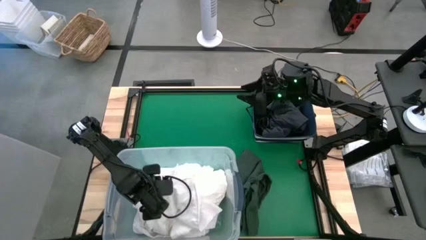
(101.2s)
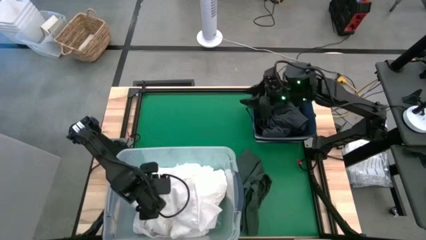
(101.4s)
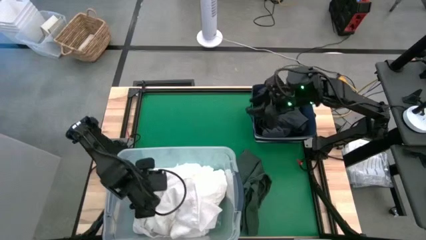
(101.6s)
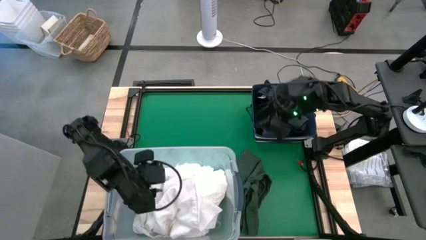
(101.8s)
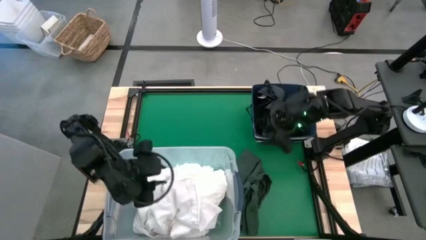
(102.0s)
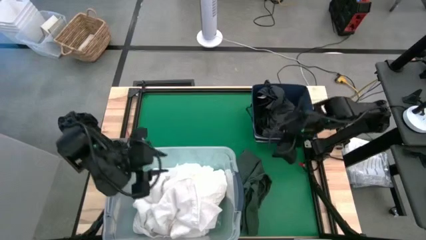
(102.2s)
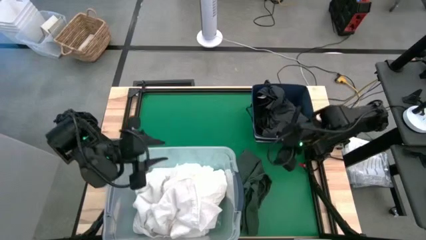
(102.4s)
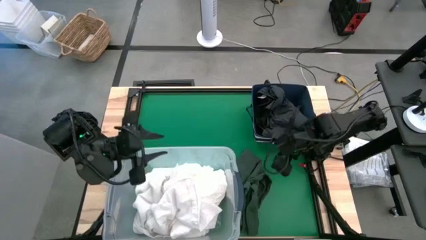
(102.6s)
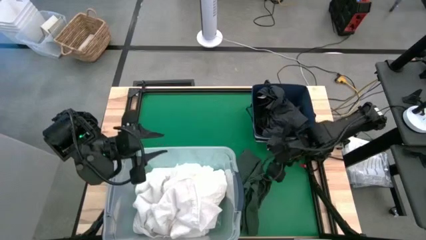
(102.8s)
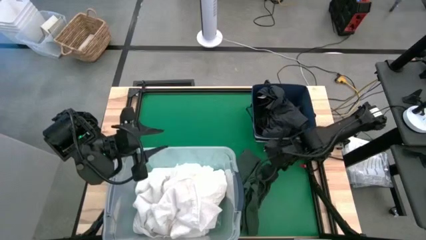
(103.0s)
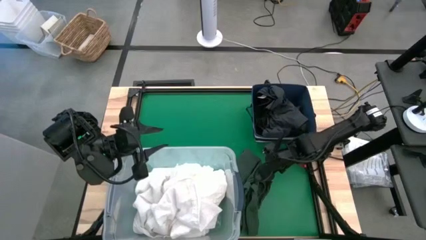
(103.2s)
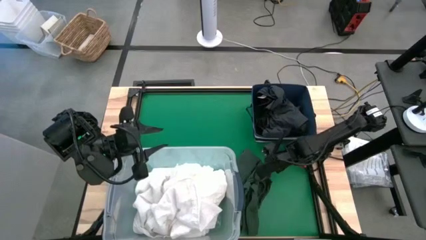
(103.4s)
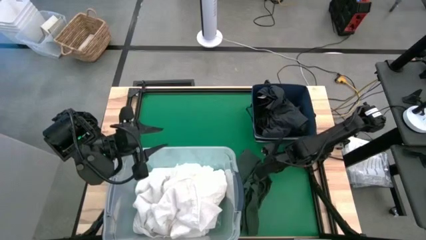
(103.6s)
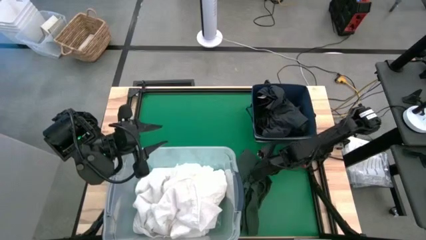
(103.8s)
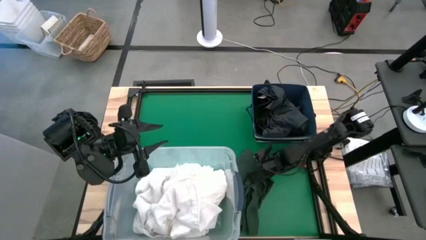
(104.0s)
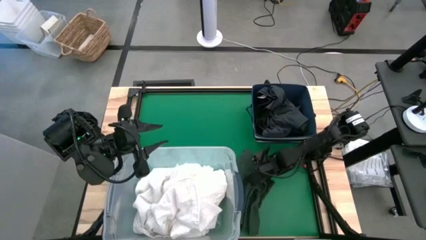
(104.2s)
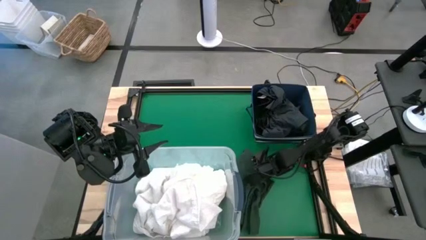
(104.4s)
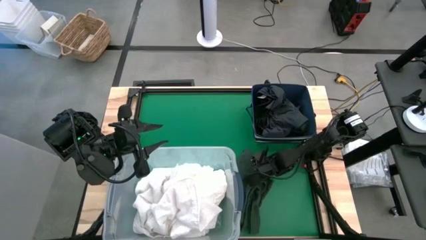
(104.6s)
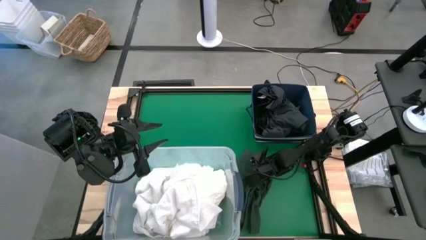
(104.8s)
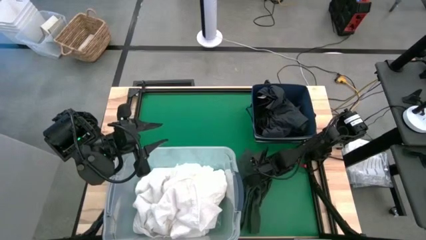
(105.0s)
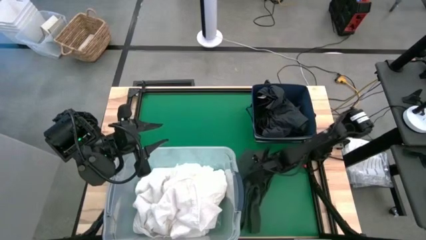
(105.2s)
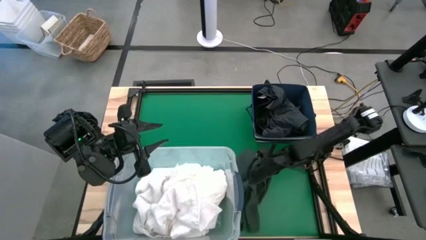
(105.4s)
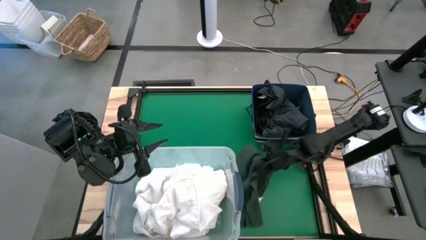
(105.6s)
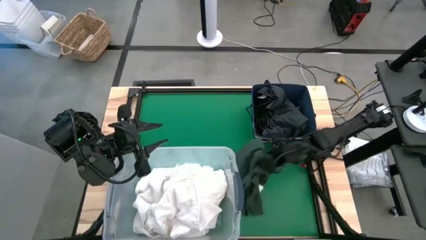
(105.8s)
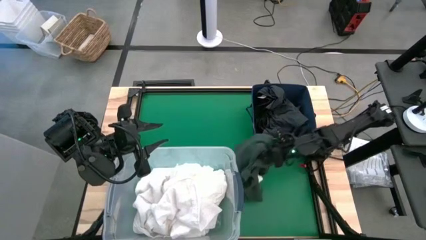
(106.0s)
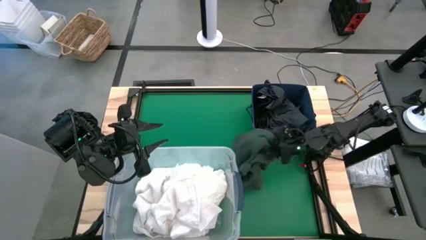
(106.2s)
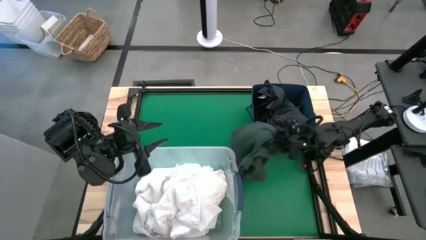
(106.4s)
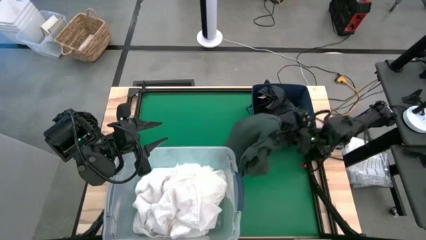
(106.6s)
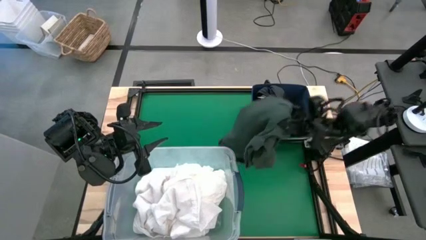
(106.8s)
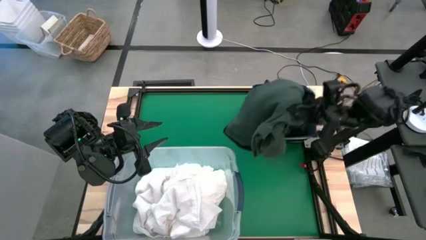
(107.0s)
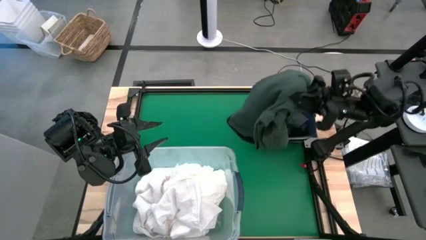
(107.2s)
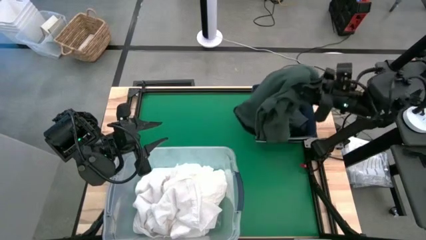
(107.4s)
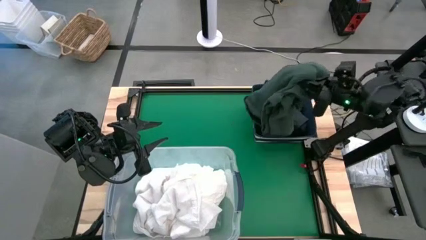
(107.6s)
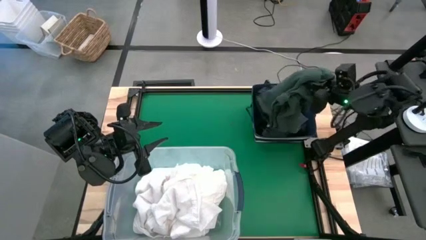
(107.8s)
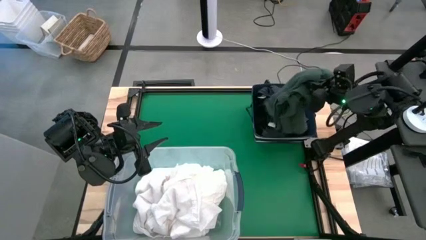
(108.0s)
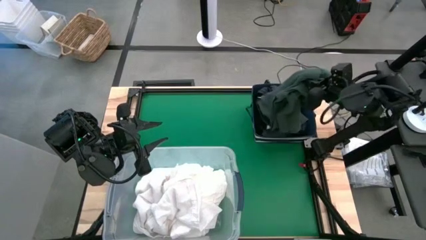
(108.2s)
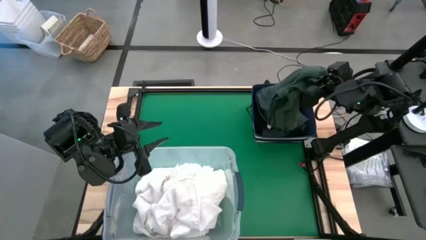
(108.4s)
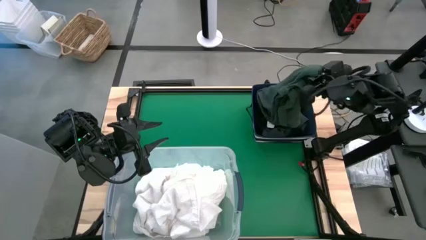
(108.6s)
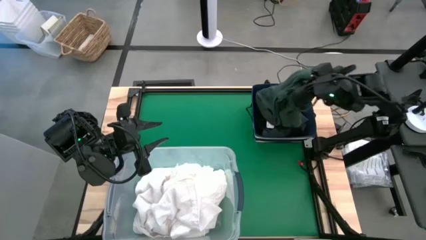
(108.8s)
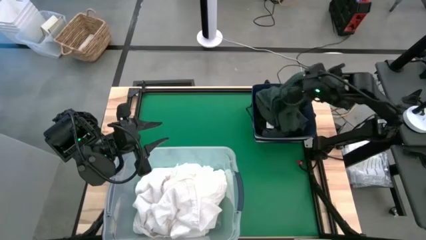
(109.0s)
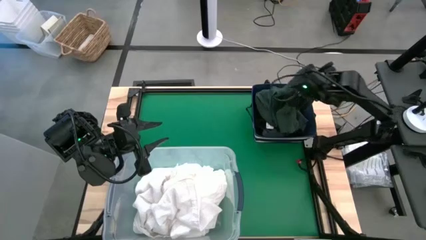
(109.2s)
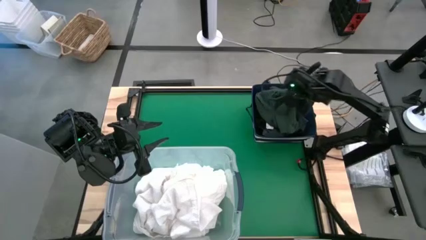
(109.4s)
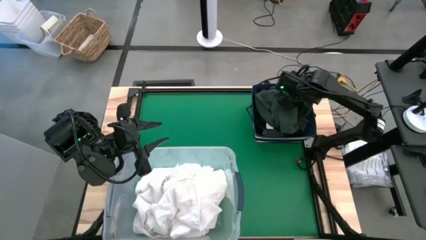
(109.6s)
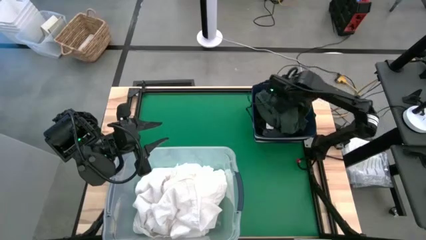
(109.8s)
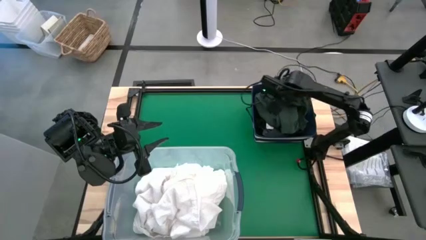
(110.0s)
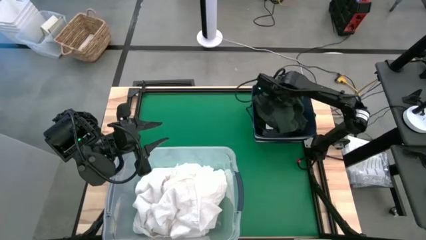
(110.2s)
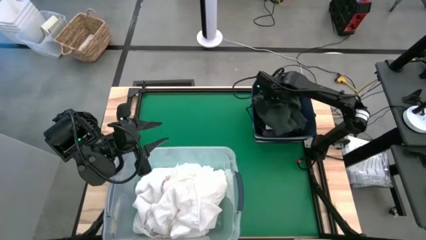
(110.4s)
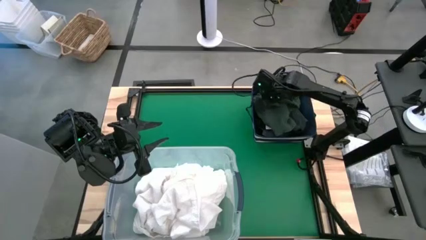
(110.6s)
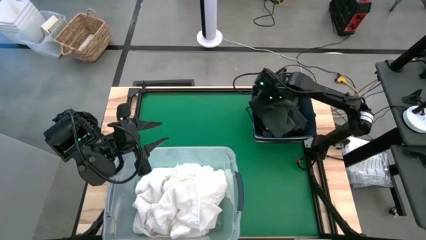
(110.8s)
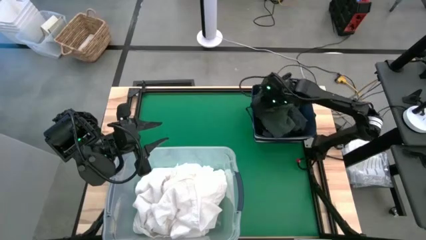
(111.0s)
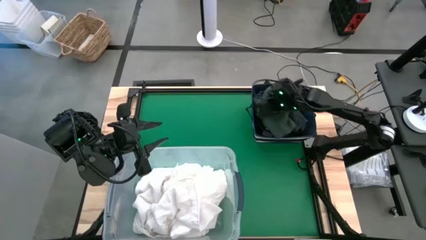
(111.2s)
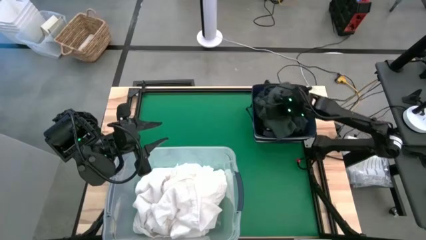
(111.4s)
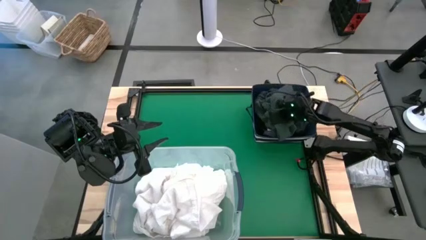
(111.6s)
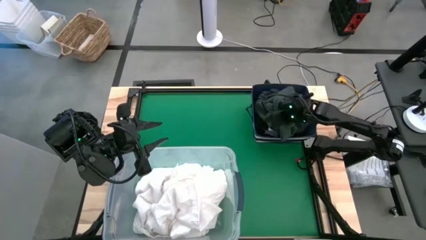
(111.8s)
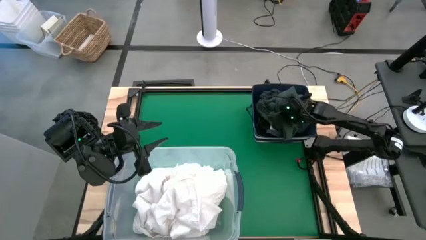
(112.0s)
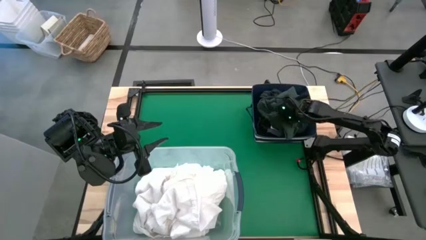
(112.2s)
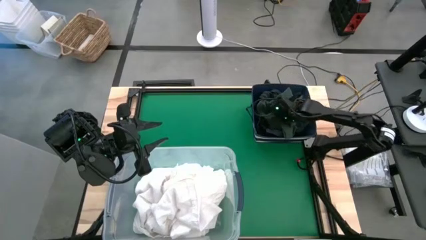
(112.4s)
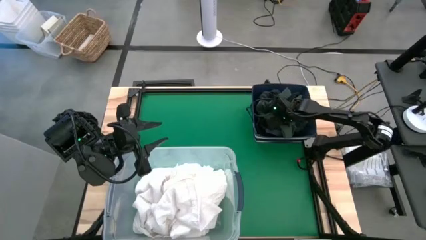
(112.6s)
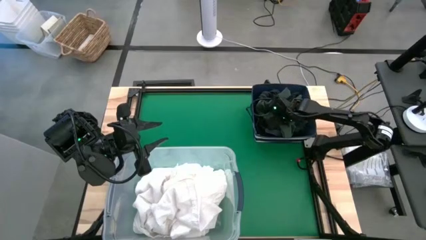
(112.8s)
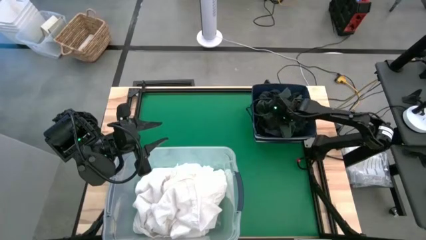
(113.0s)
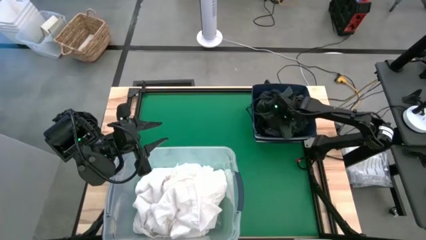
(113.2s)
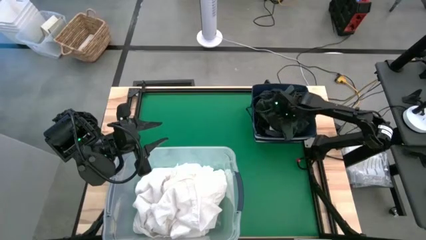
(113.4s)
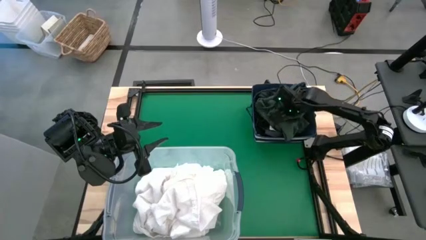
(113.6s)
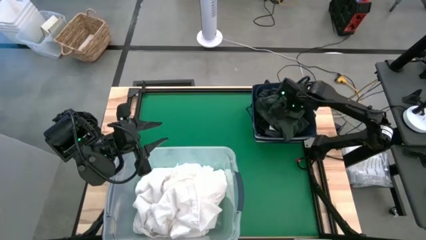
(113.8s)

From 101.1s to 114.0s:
Put the green long sleeve shirt into the blue laundry organizer
